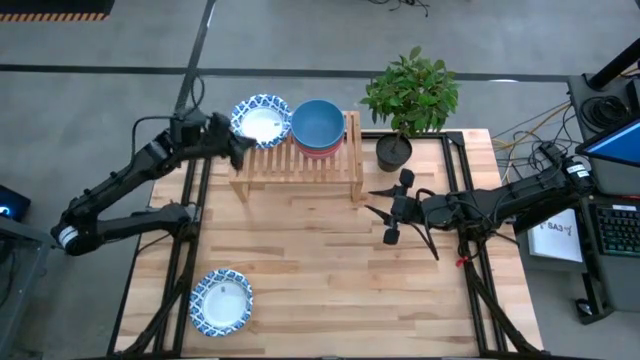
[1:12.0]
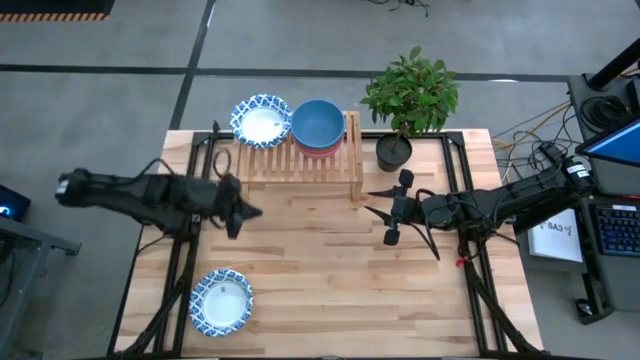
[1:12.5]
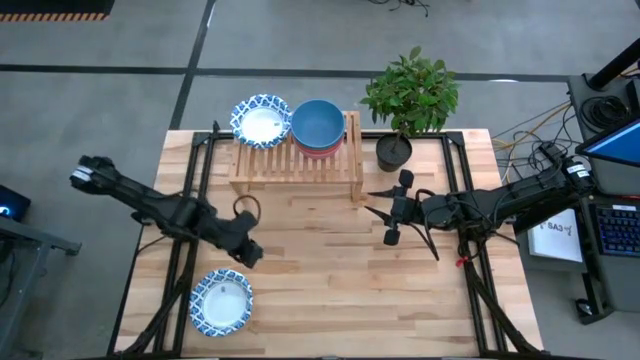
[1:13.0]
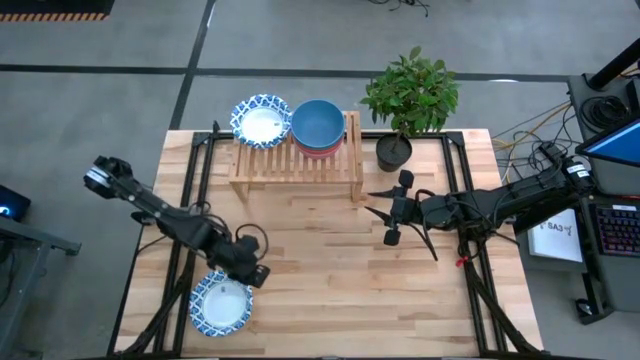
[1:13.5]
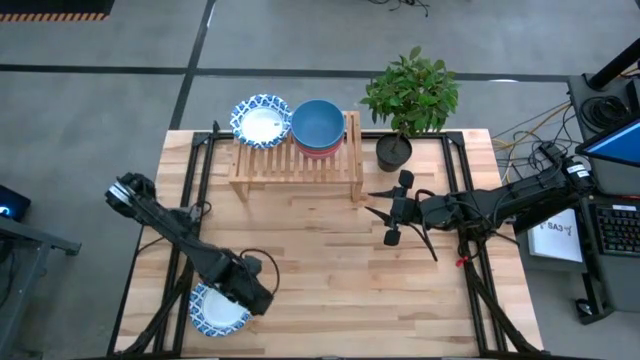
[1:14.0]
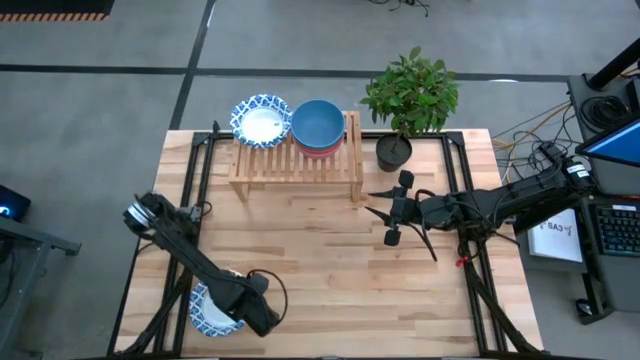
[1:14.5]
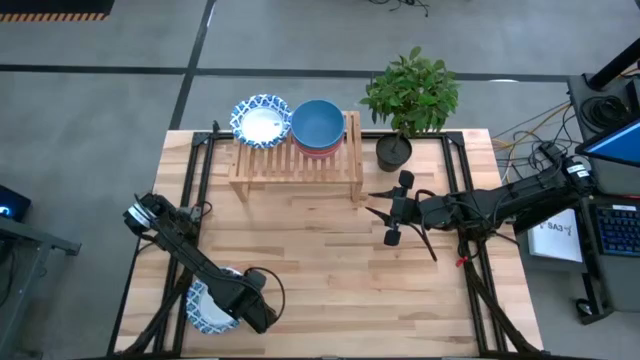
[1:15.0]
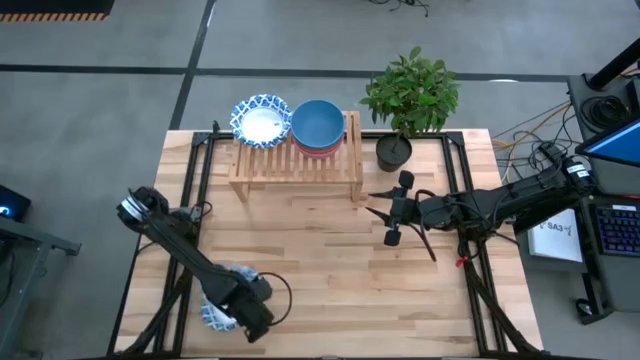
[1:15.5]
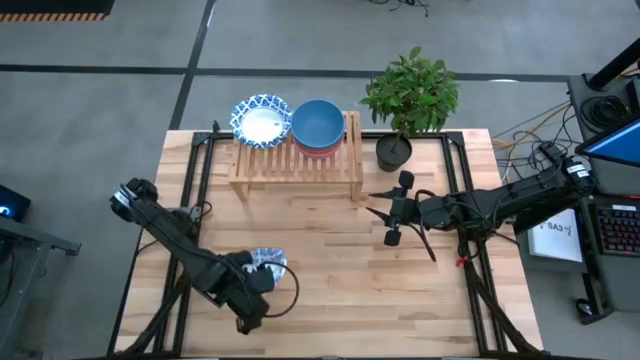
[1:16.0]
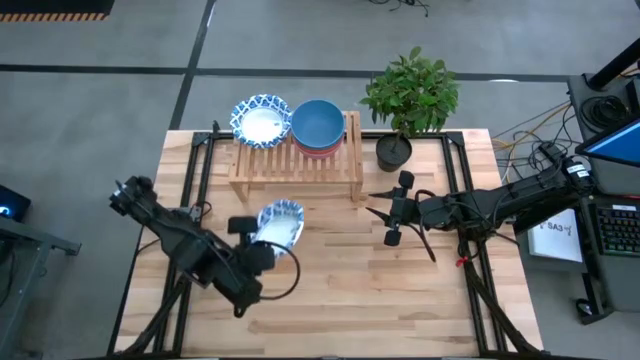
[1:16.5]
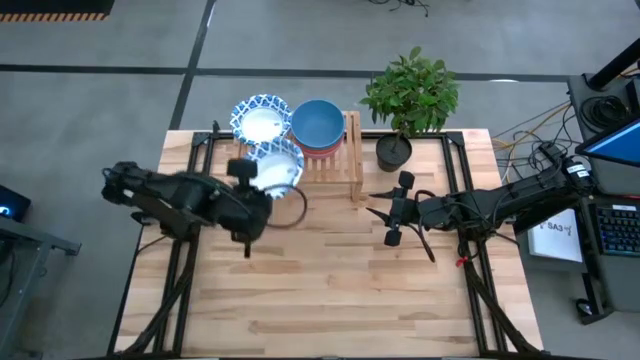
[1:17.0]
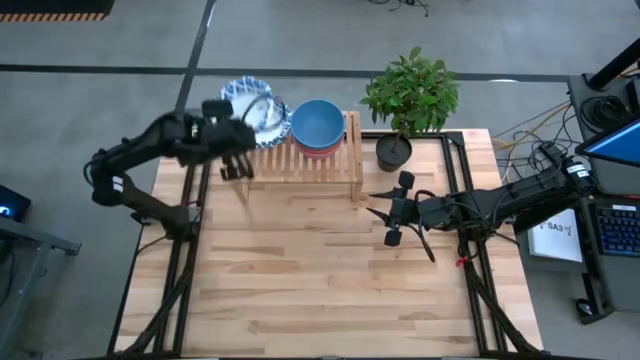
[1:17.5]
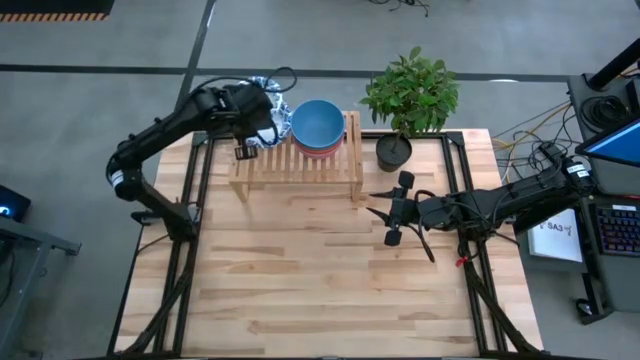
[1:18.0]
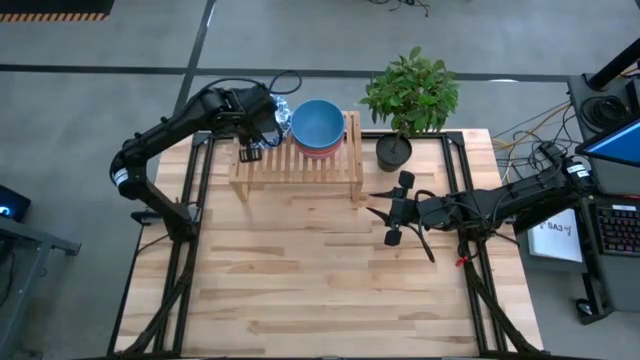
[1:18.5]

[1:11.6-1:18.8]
Task: Place and stack bowls onto a shelf
Stack the white bowl on the top of the other white bowl on the shelf

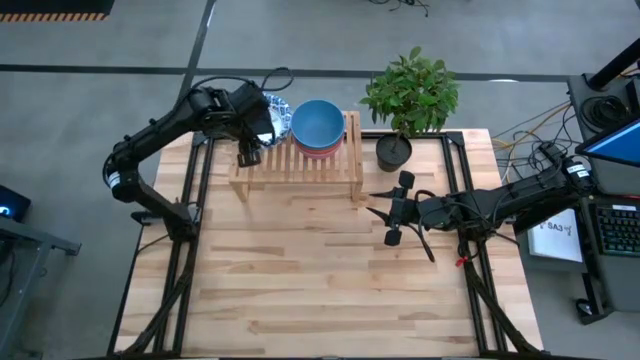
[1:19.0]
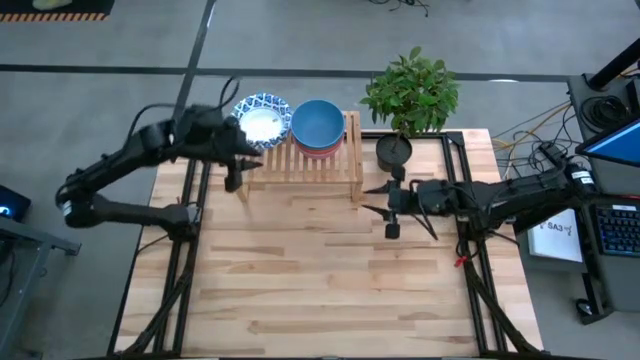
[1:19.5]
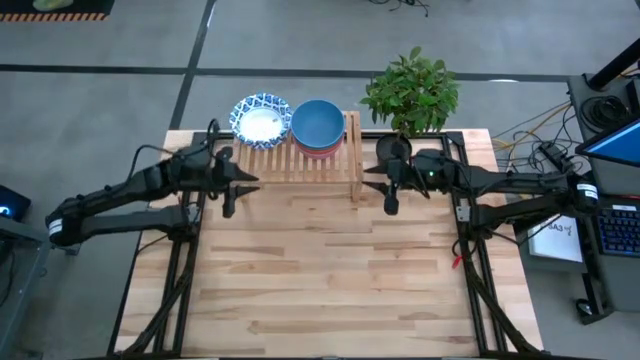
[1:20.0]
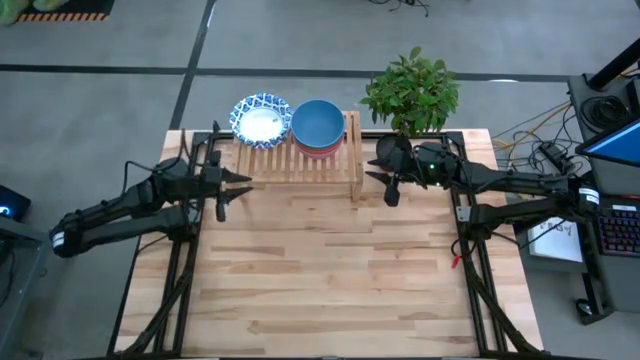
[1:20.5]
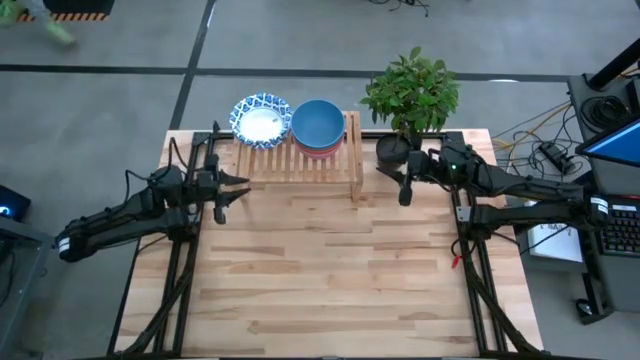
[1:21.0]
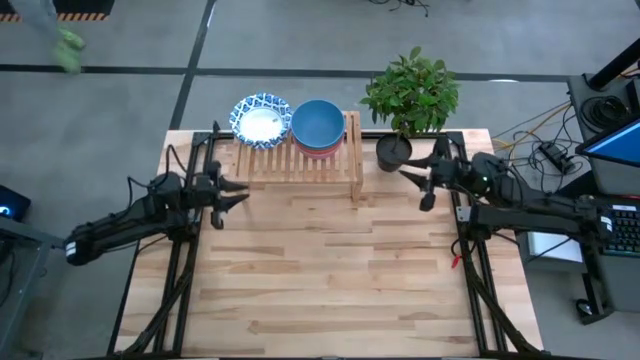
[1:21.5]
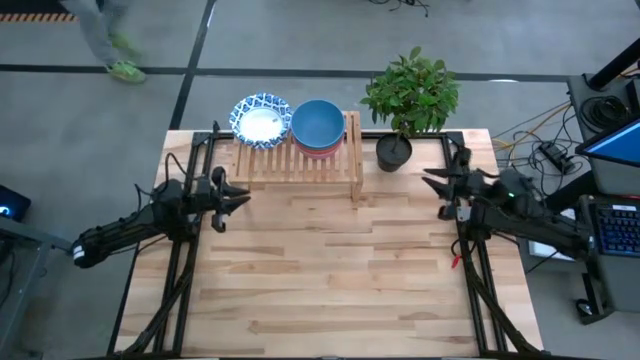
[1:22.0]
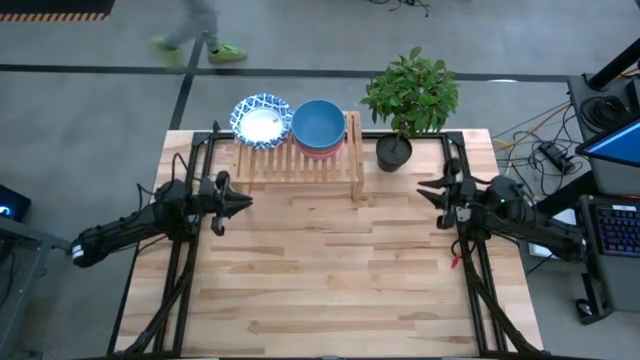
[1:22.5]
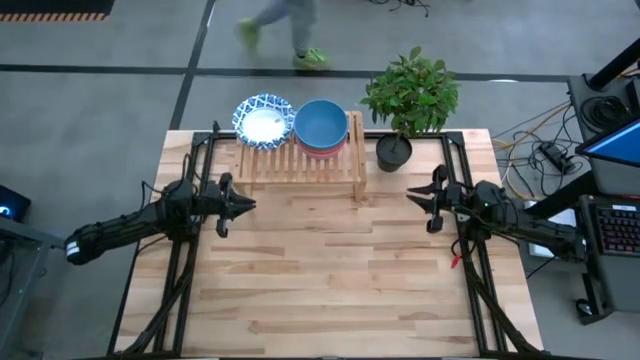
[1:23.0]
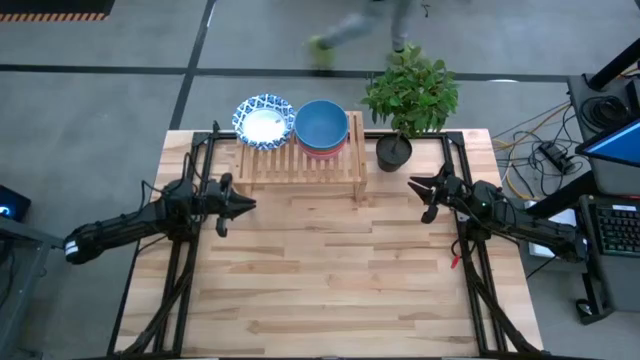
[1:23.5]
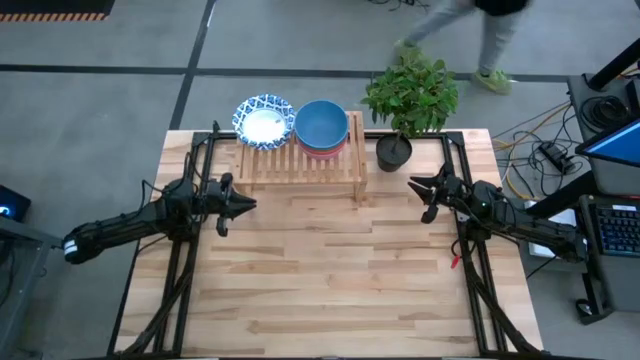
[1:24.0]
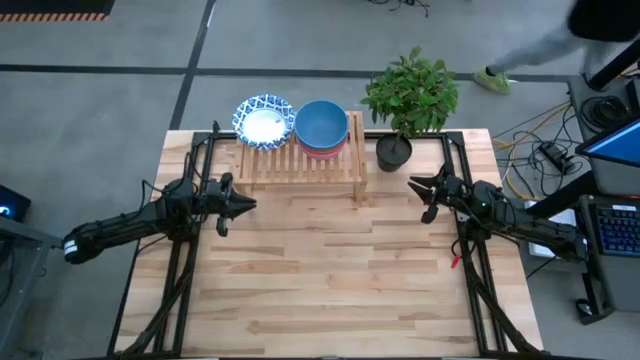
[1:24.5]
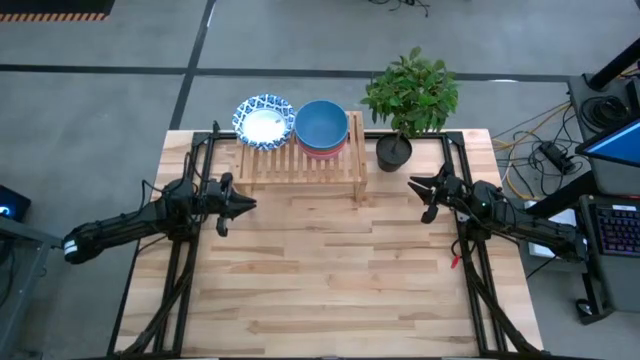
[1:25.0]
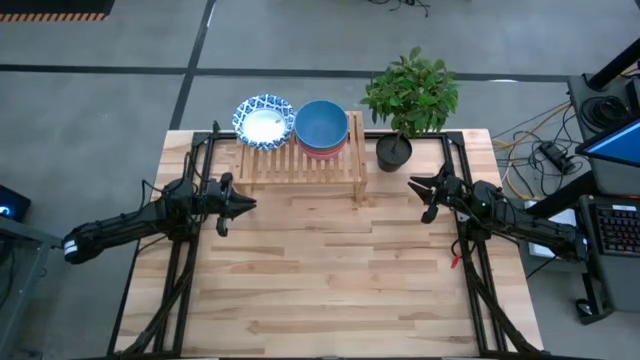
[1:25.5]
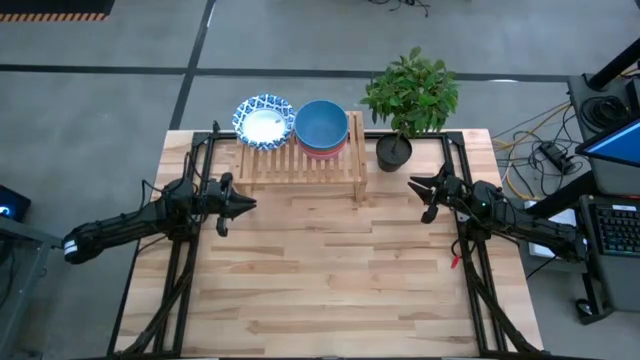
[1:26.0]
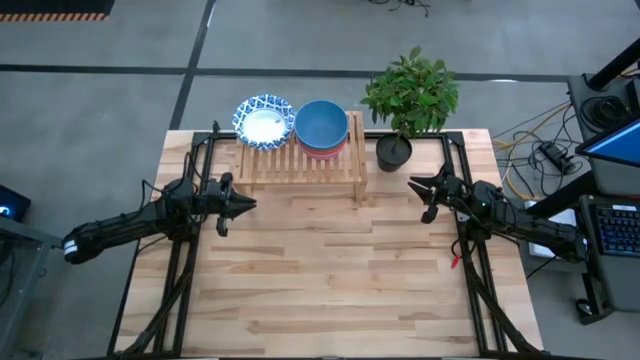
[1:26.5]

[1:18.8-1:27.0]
Return to Home Position
